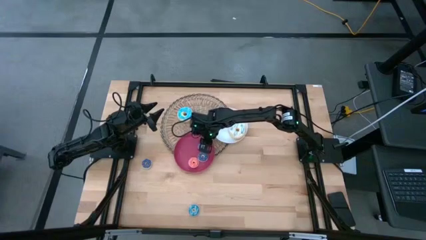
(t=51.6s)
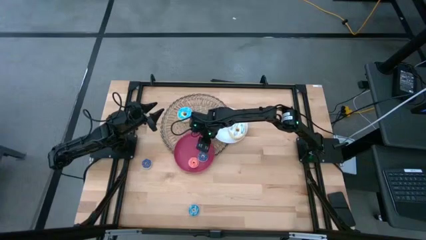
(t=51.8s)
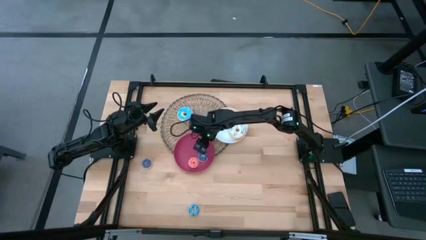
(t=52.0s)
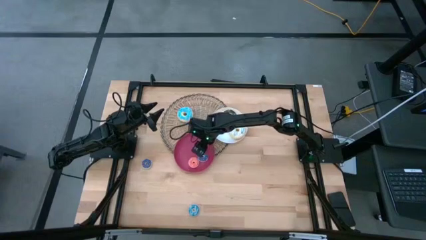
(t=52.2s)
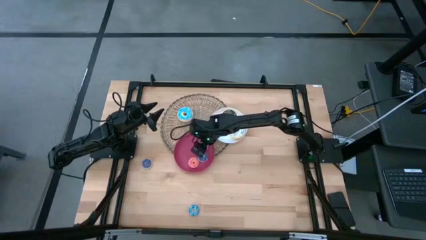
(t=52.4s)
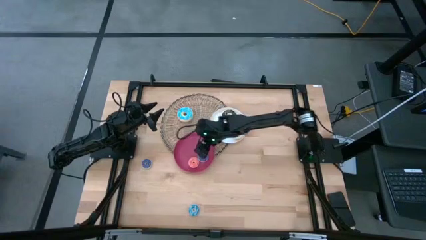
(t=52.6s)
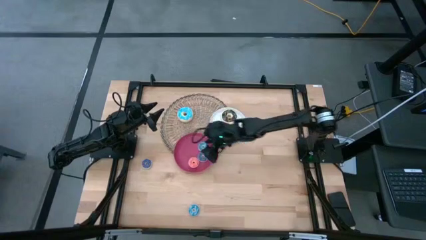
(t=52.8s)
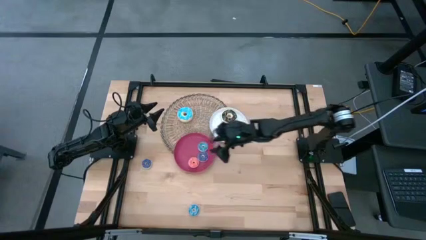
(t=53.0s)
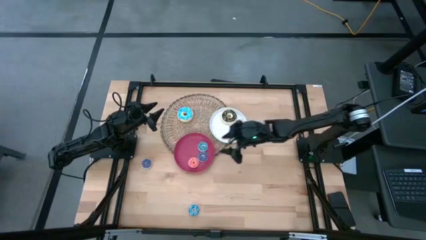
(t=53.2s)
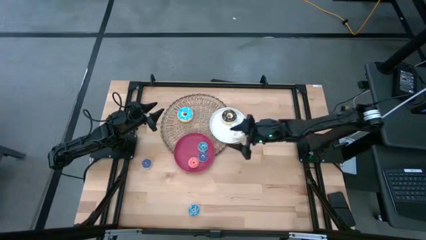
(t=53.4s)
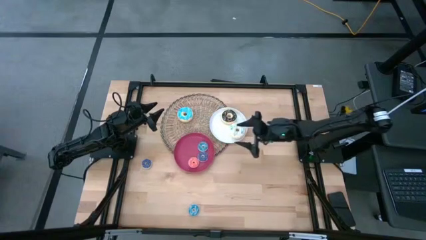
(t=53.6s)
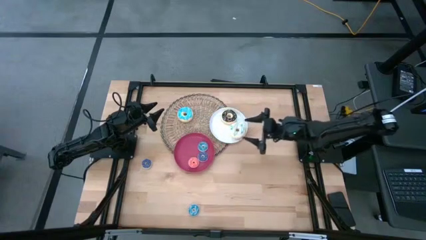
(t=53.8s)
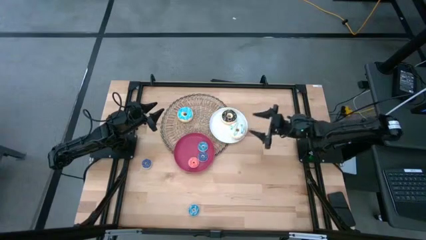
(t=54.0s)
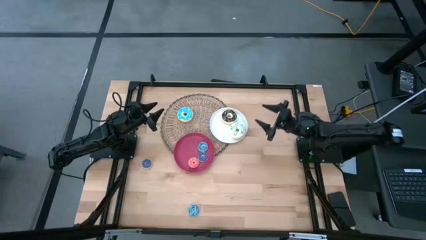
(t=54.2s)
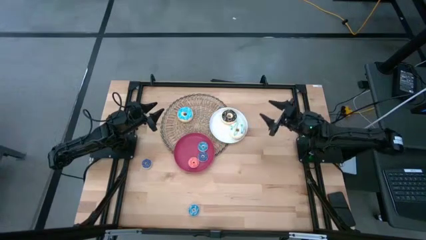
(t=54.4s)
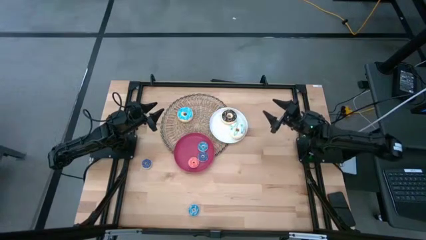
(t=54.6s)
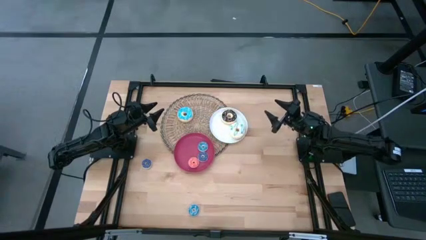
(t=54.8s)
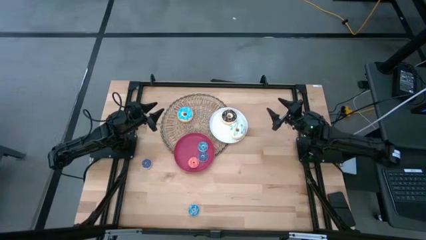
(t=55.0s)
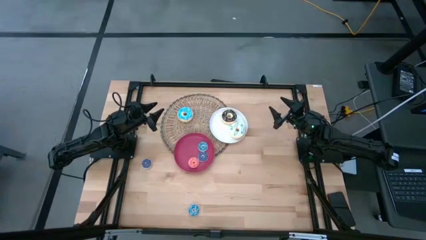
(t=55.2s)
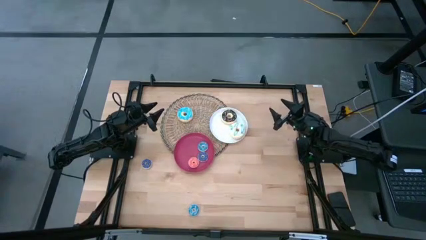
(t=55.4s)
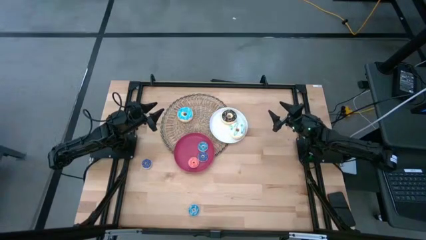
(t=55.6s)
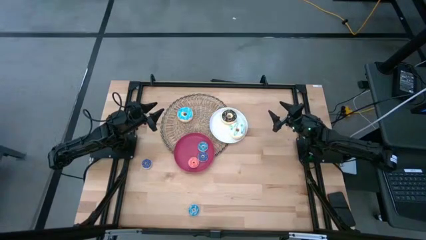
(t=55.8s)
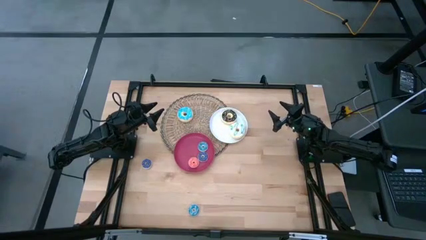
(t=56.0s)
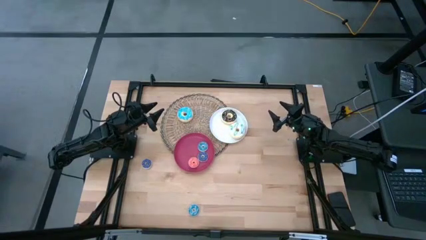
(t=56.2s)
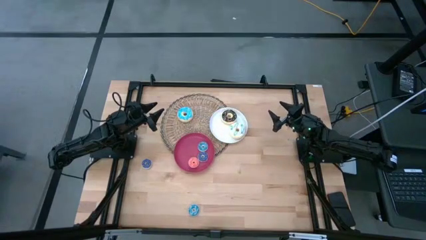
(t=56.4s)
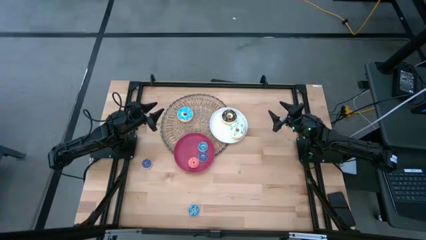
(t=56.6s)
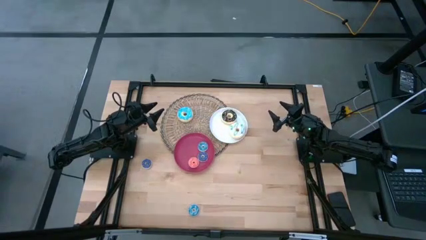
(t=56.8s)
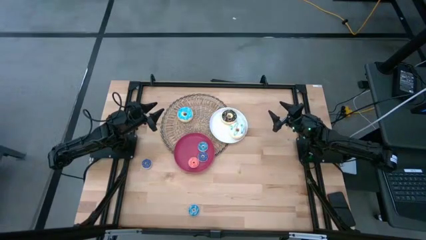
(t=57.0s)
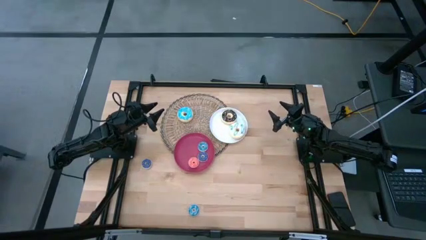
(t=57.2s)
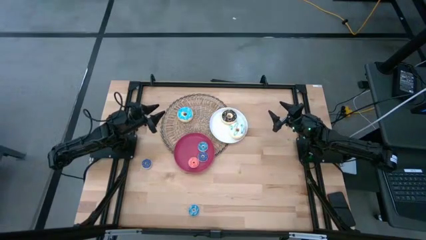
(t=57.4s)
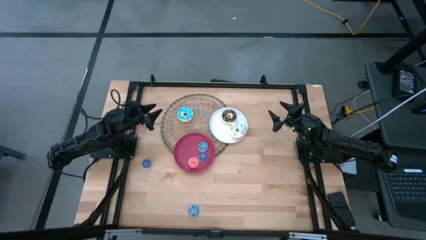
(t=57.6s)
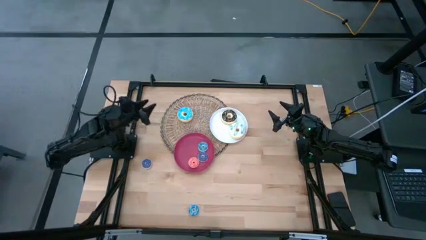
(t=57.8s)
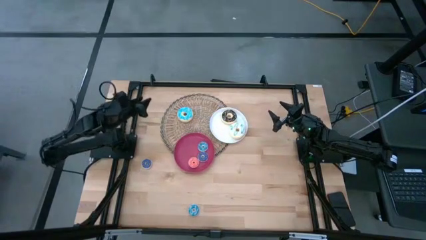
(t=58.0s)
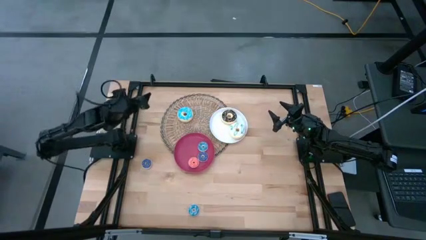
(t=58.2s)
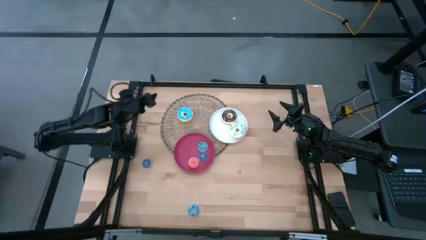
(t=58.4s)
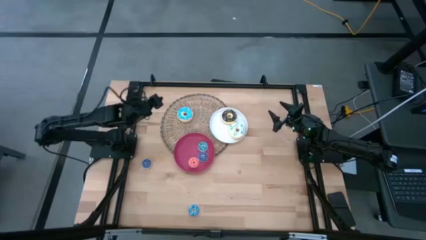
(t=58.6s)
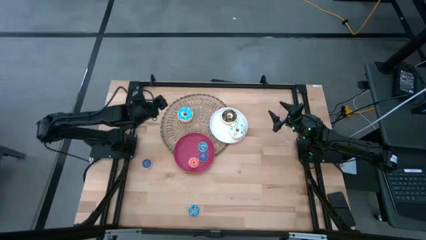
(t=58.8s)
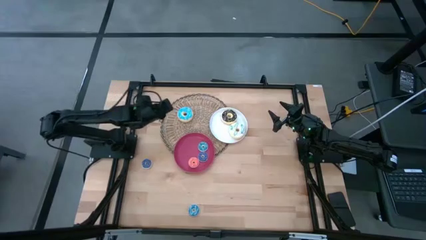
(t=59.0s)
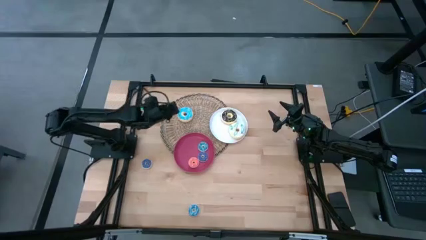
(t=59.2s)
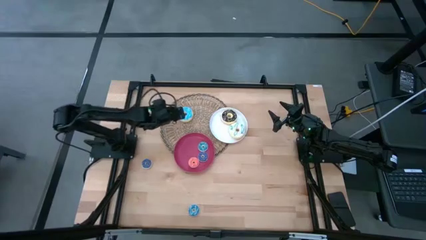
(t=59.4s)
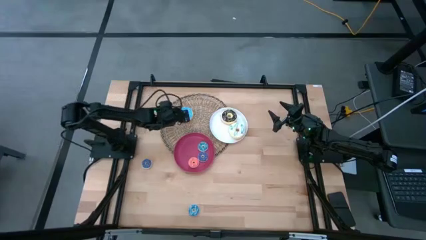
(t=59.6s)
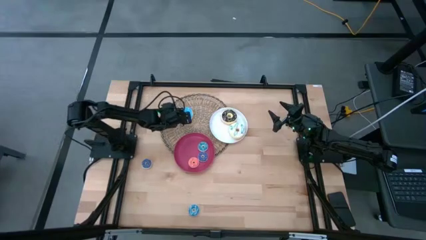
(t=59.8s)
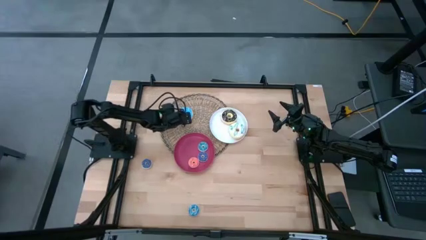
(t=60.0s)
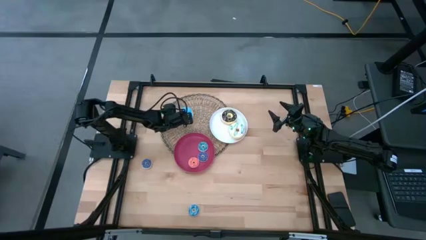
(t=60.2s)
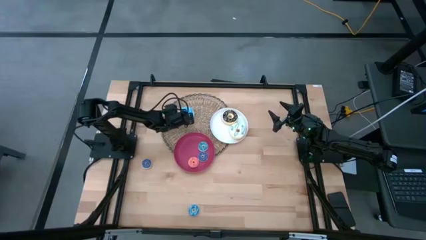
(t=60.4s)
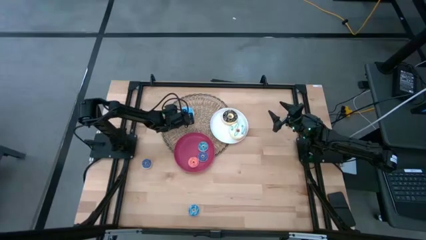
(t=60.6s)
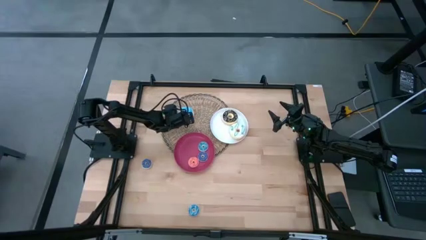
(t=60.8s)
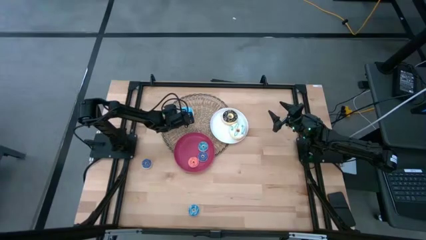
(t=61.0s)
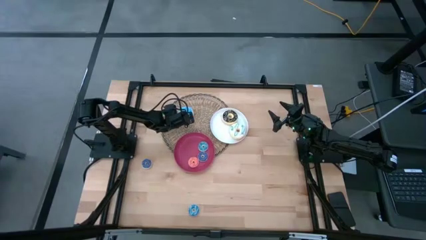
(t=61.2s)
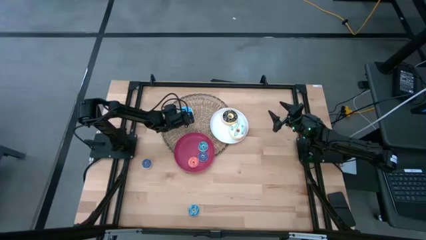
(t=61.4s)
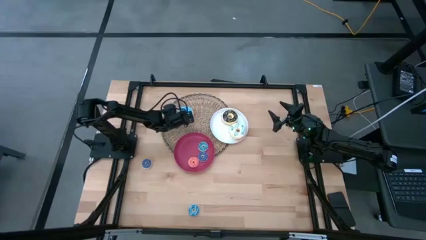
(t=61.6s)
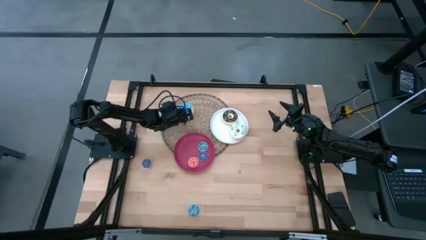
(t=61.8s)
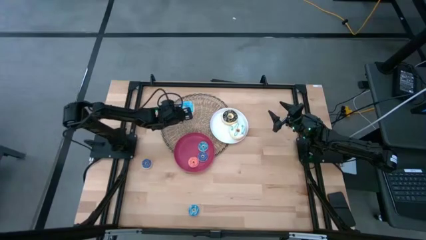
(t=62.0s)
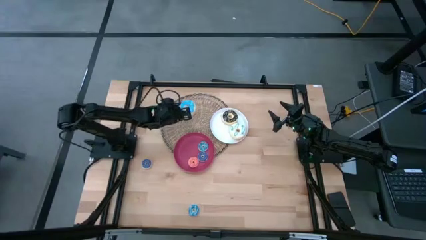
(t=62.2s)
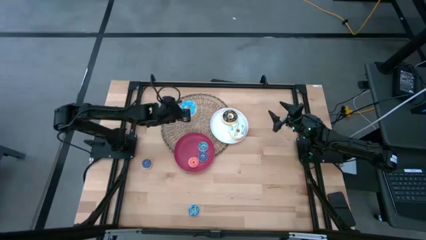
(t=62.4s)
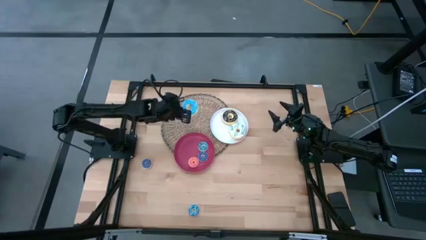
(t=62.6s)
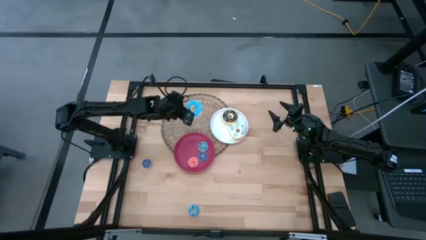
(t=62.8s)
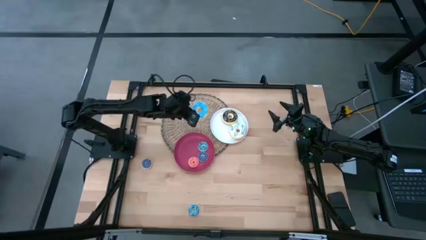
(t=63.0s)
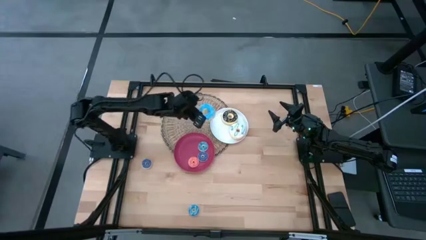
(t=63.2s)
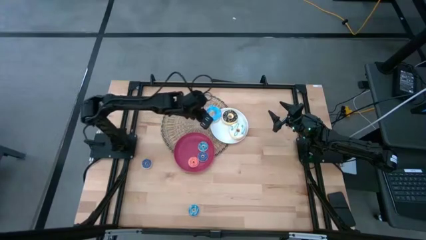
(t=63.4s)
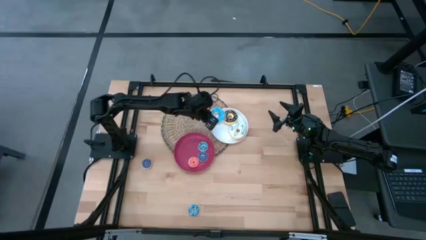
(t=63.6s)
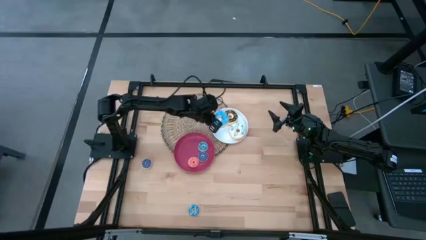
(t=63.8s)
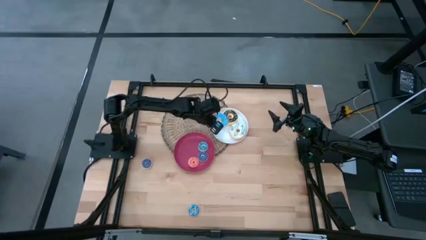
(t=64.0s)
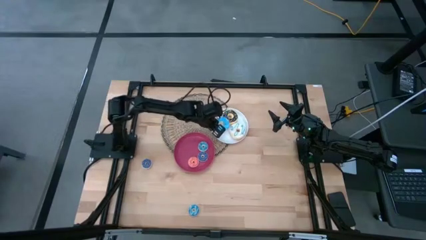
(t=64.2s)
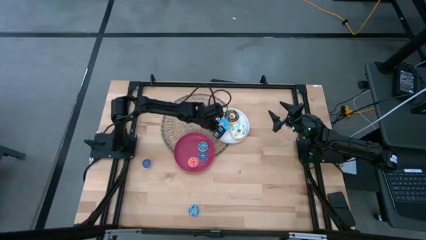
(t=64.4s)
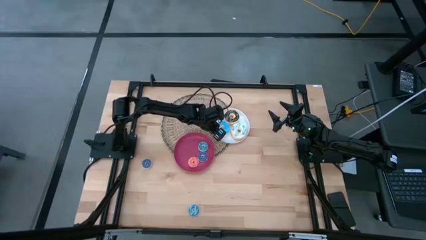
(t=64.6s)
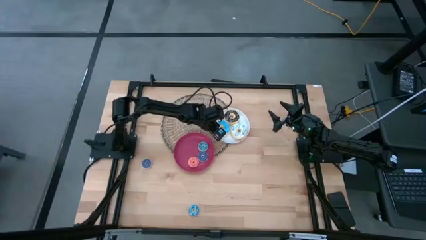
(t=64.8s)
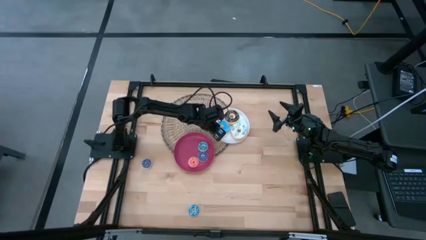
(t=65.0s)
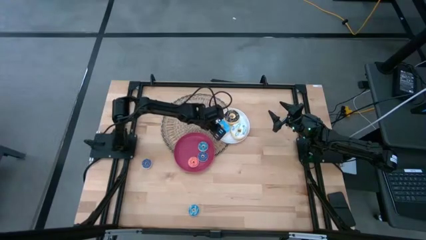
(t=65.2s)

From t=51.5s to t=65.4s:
Task: Pick & Place donuts
Put the large light blue donut on the white plate
